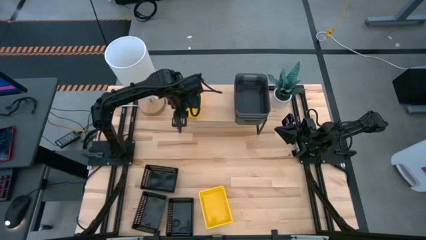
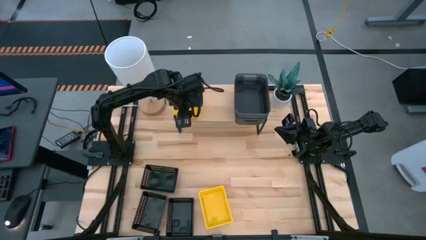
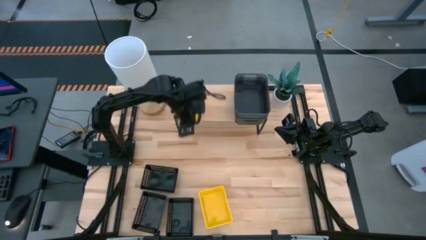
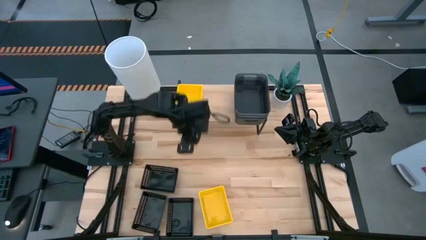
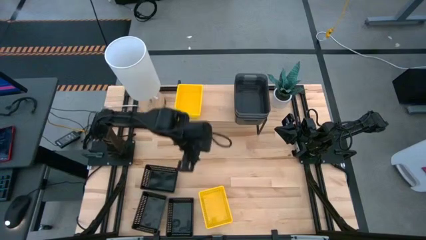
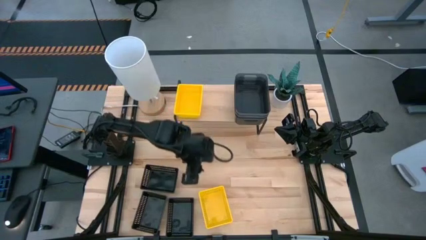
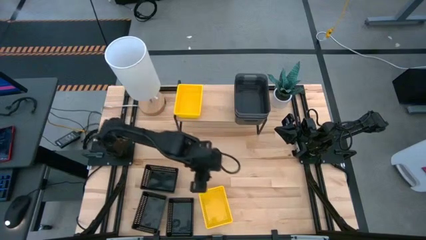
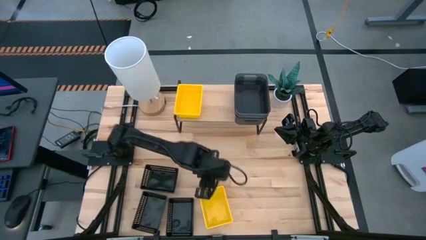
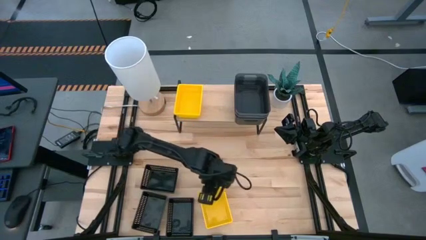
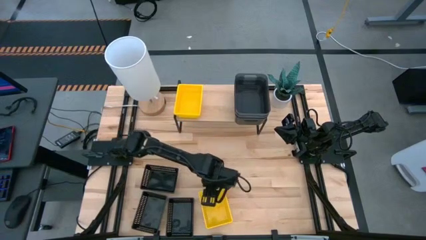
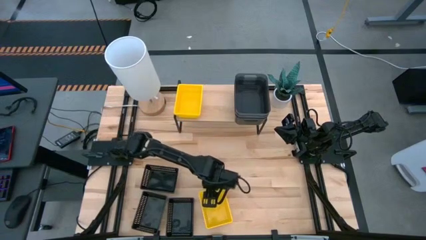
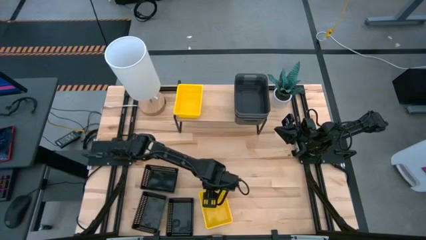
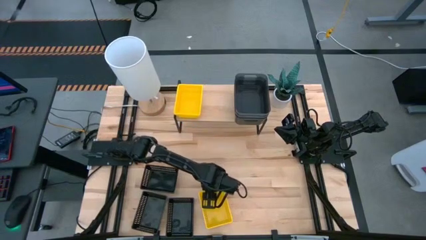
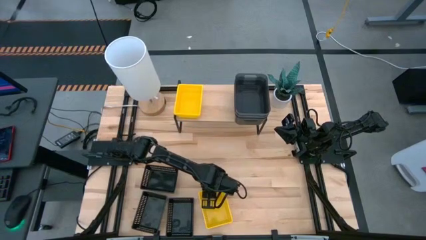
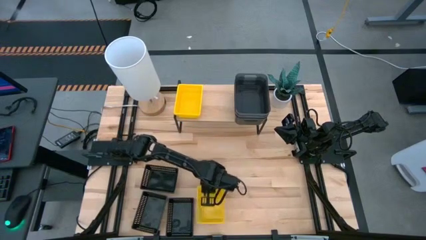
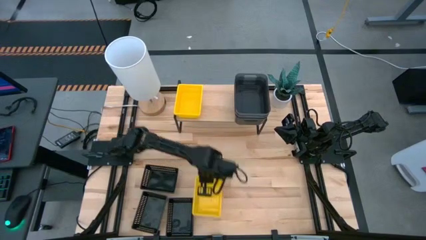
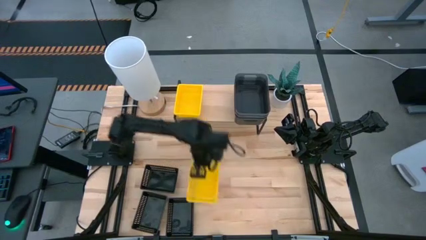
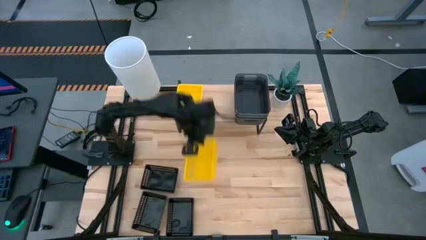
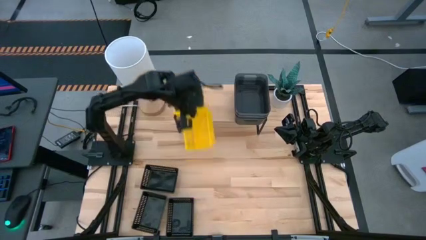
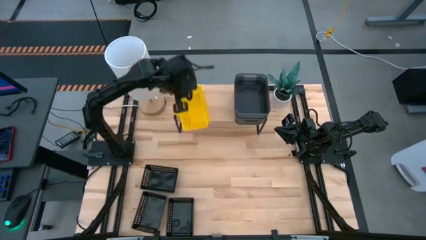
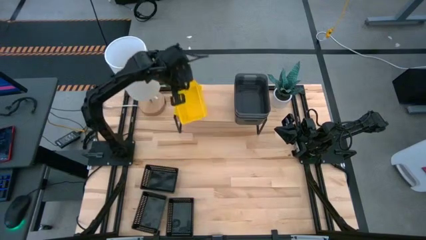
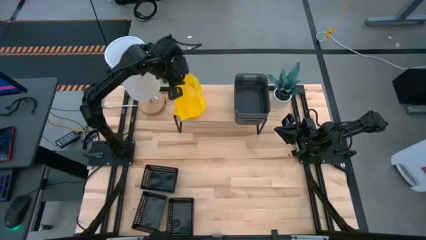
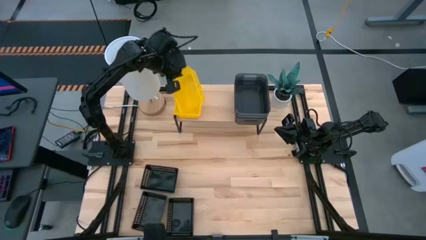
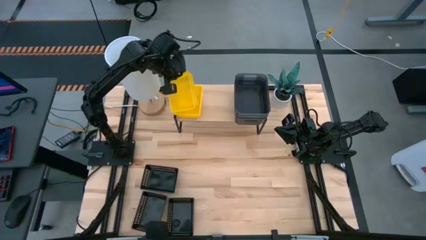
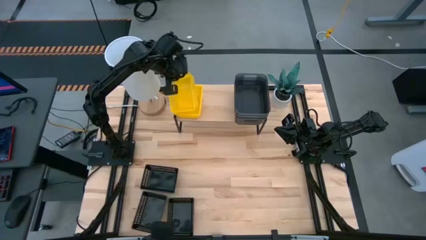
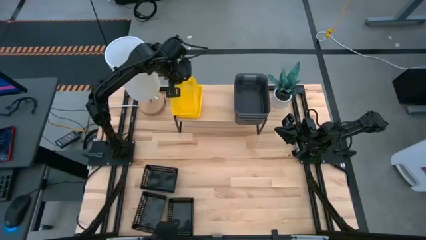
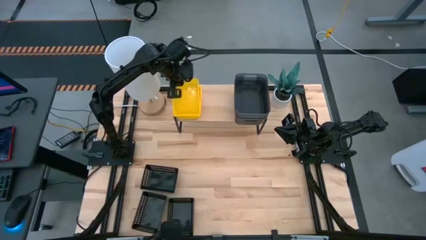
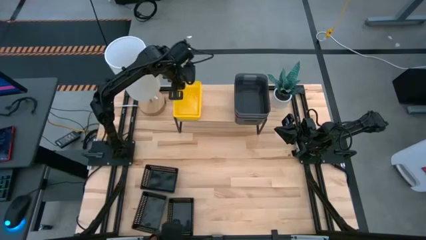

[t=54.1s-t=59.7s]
Task: Stack baskets on shelf by color
Stack the yellow bin on top of the yellow bin on the shelf

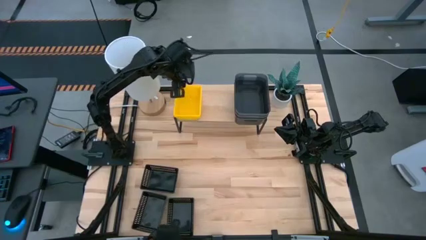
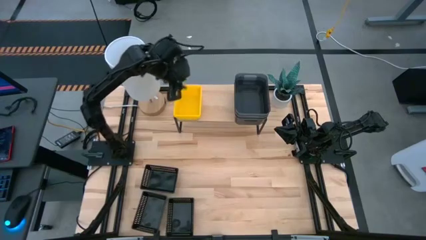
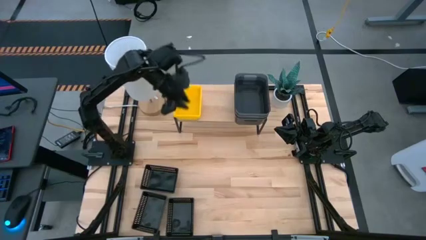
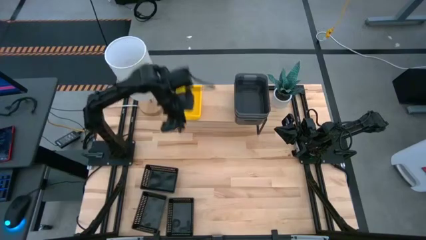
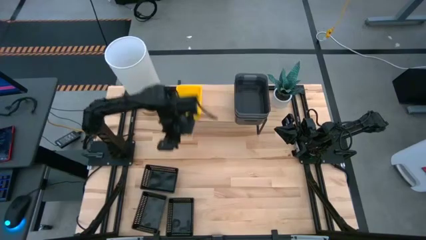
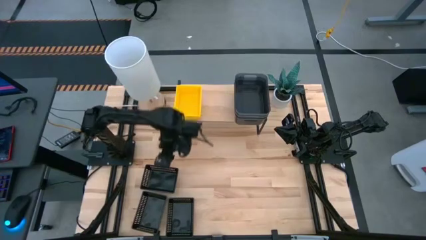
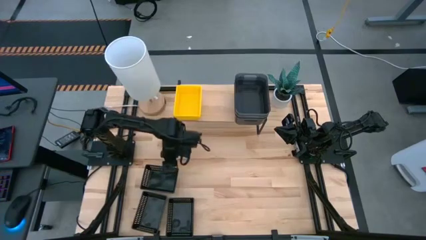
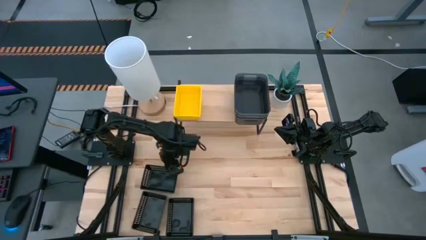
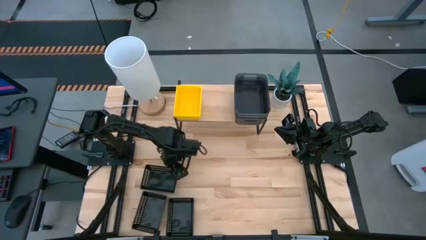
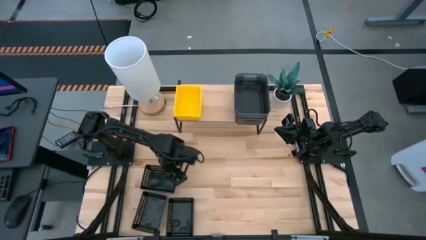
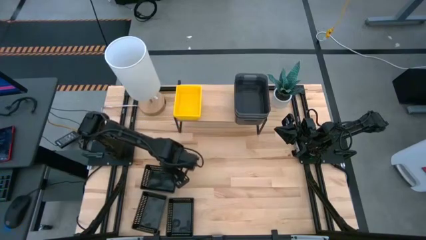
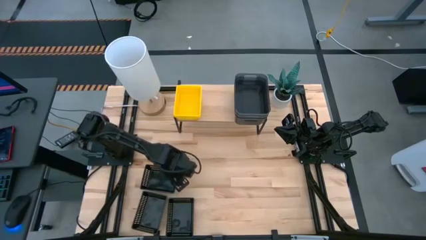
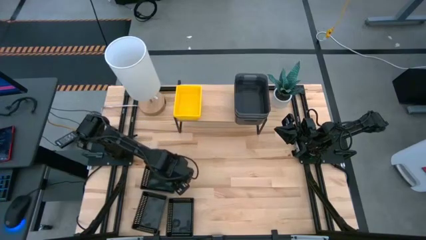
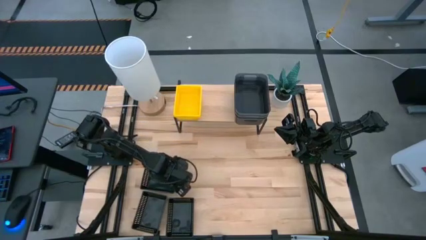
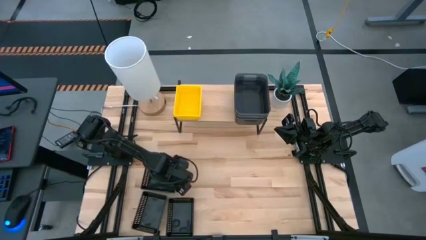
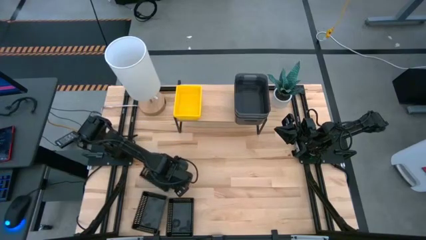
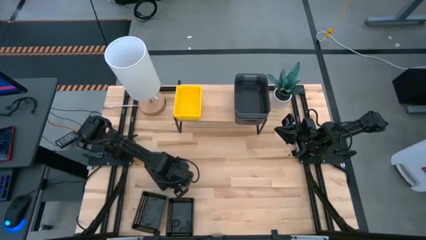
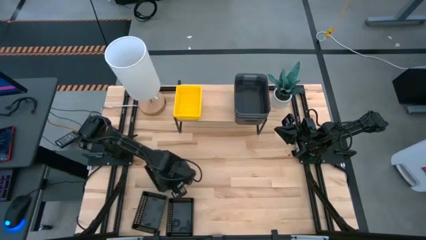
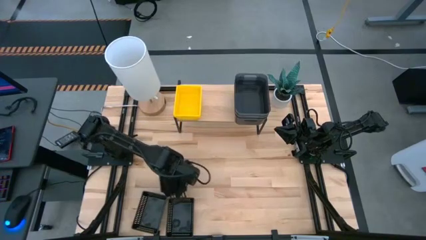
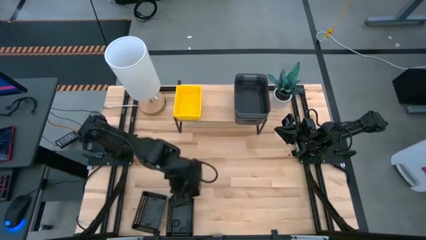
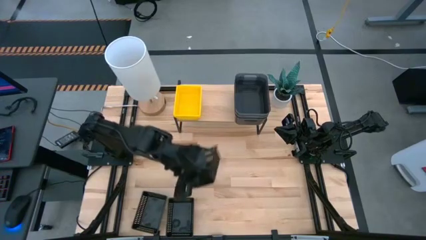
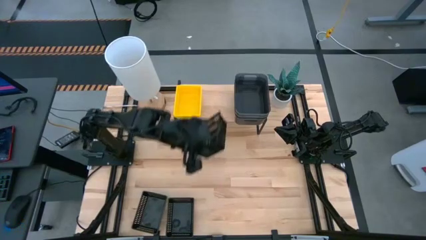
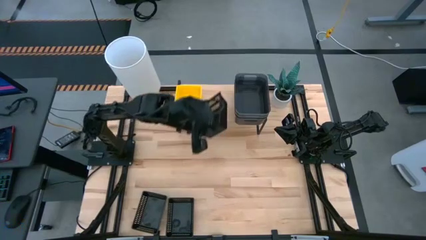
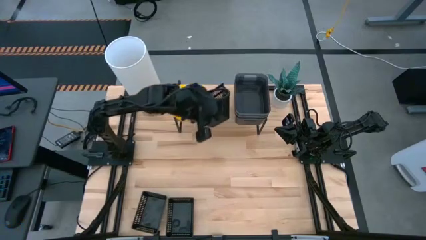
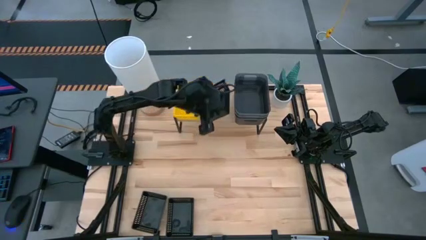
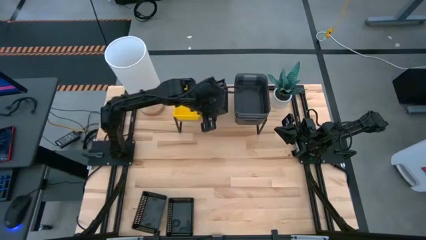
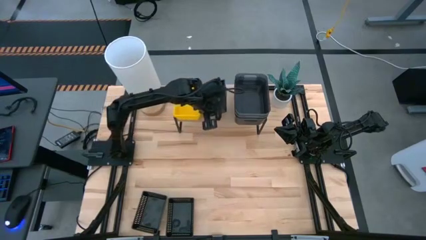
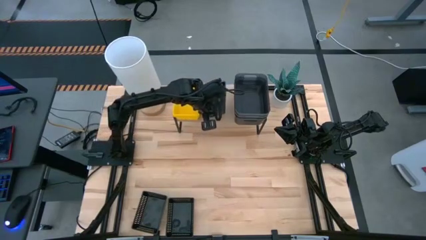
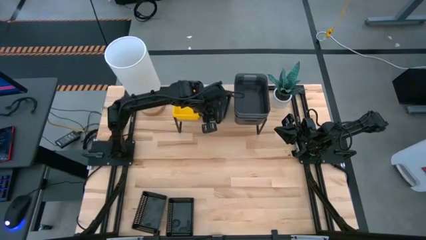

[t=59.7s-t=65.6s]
Put the top black bin on the shelf

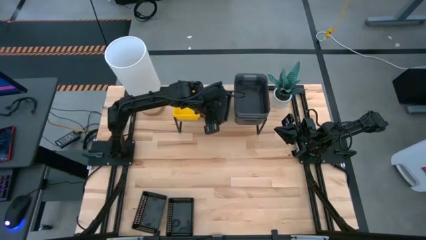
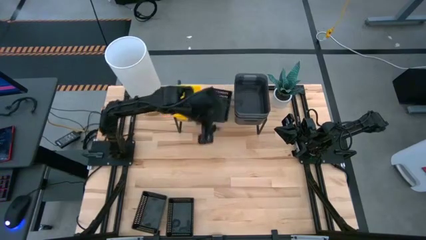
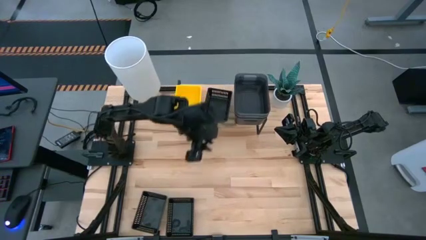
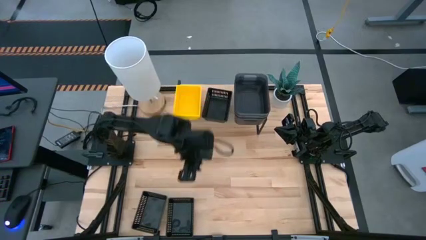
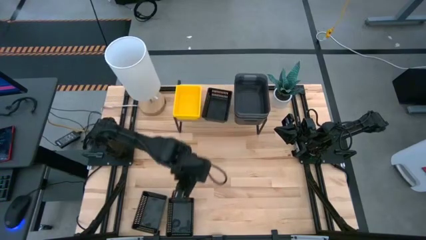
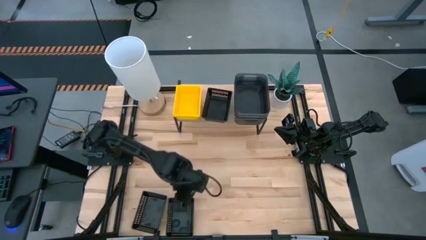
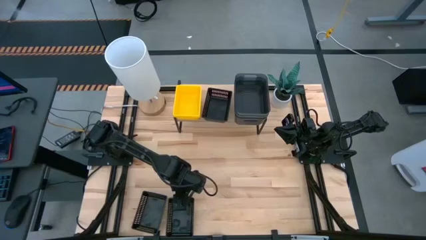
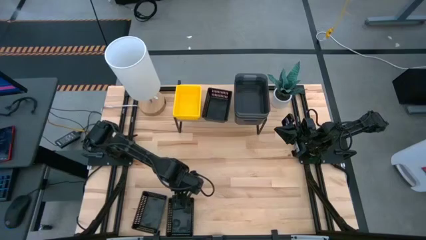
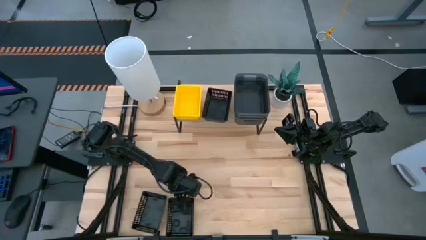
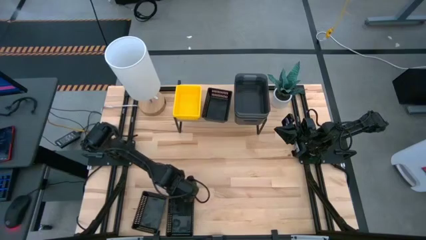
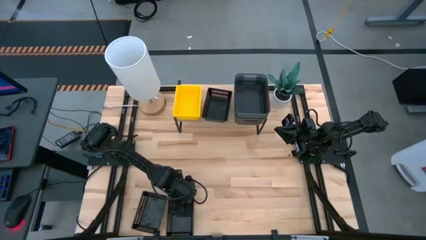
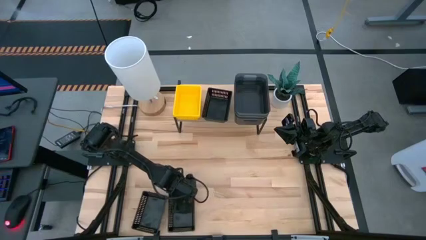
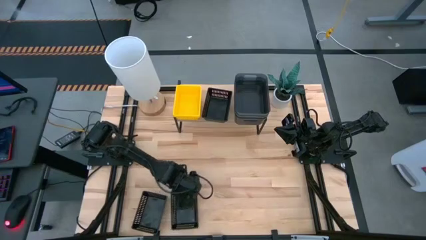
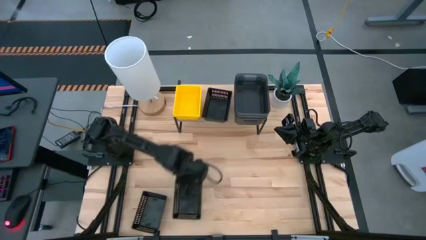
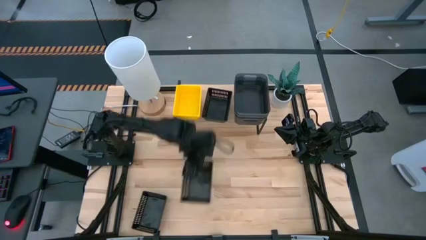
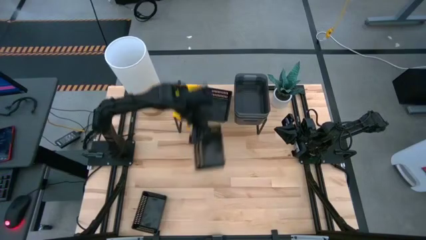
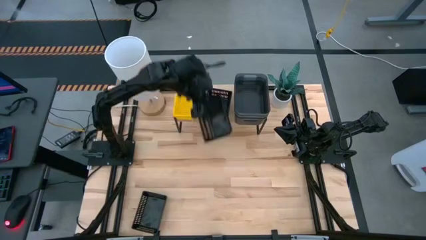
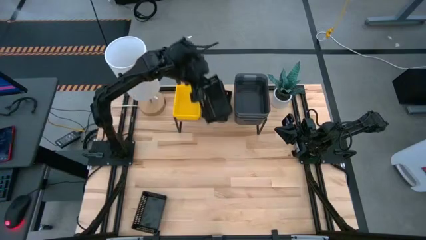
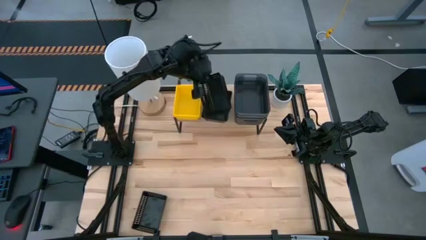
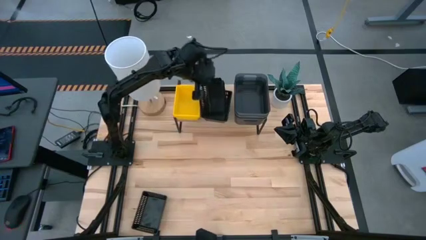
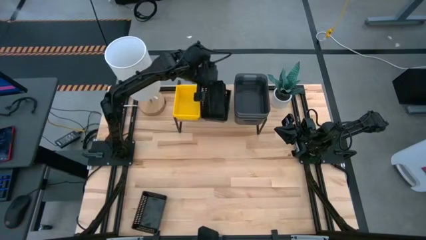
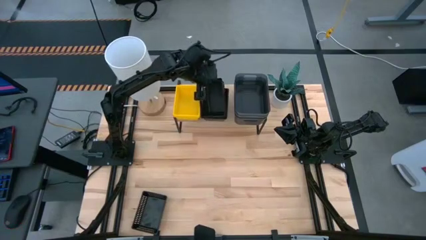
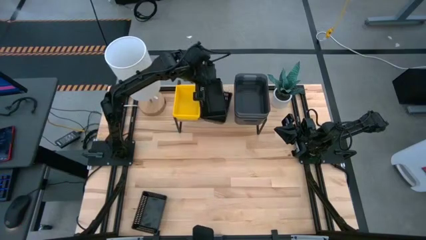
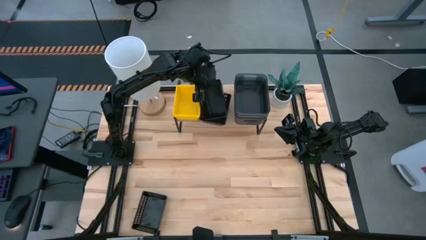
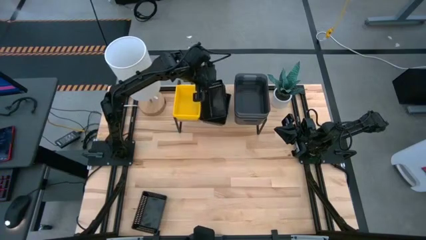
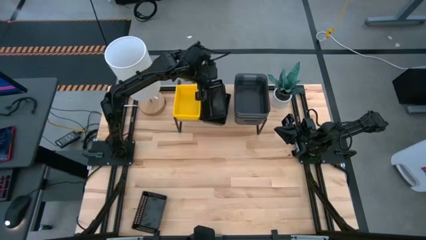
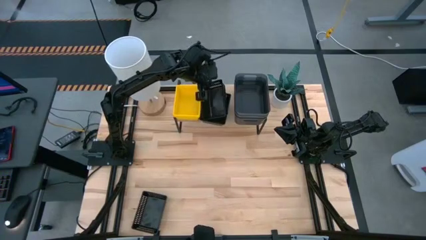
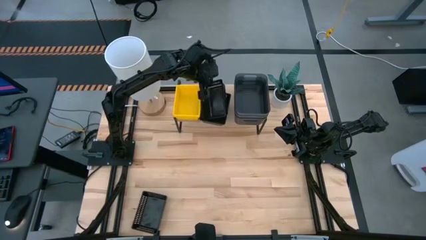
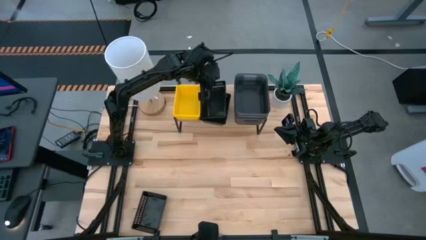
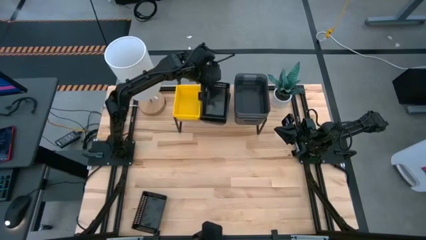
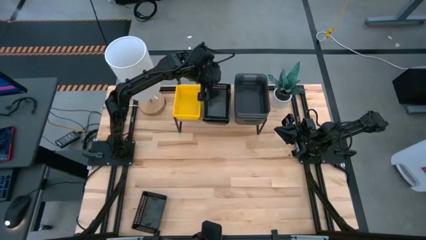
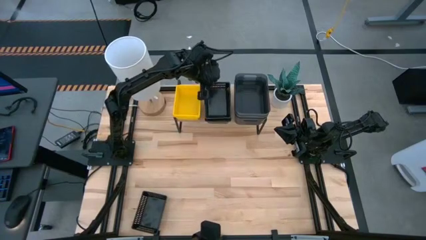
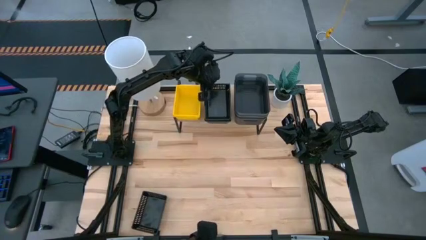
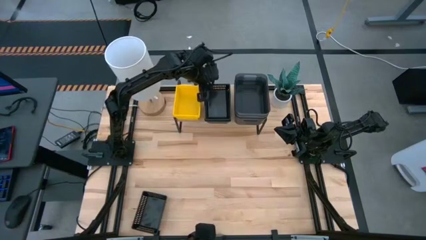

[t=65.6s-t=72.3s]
Stack the right black bin on top of the black bin on the shelf
